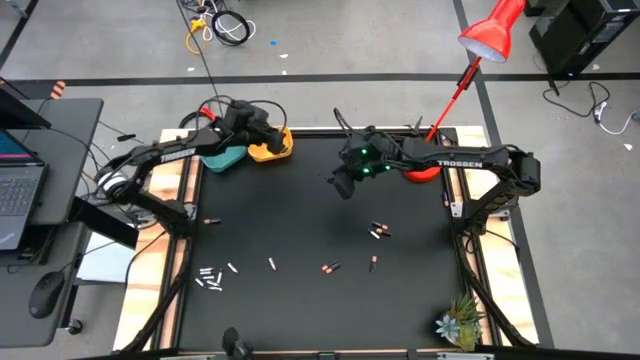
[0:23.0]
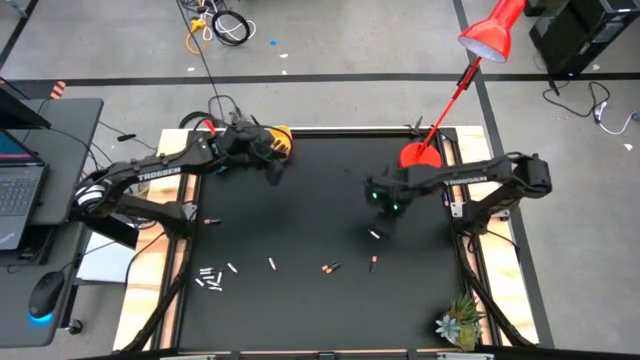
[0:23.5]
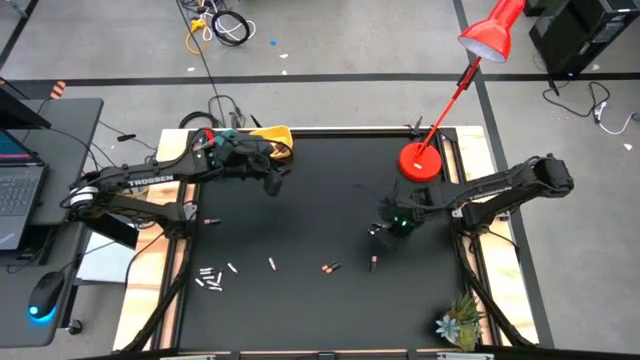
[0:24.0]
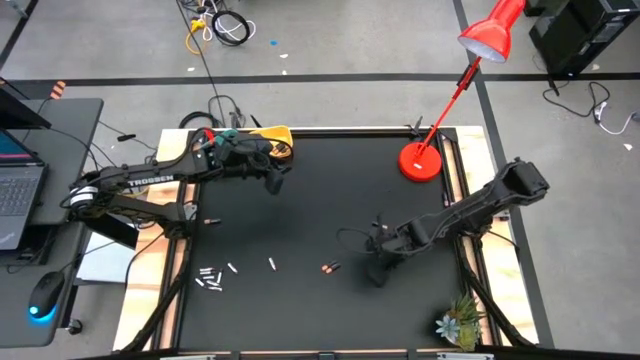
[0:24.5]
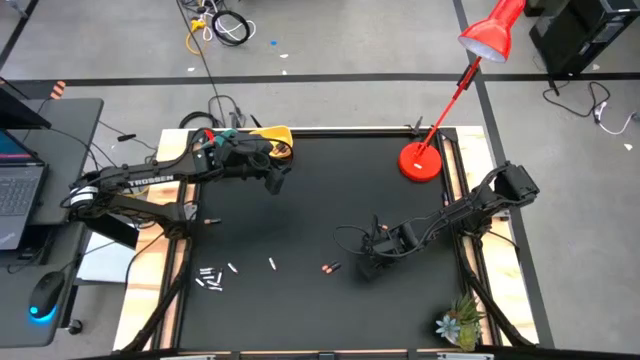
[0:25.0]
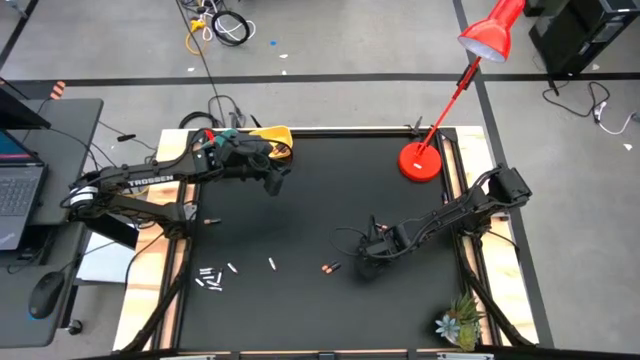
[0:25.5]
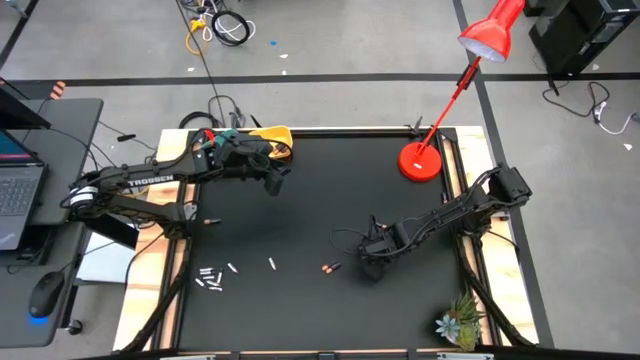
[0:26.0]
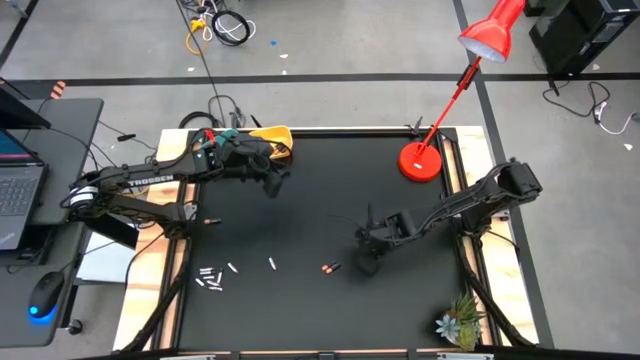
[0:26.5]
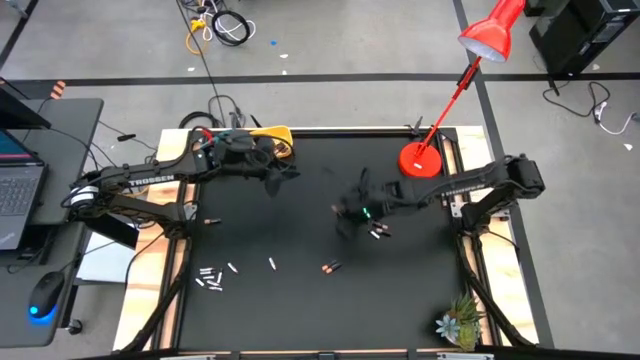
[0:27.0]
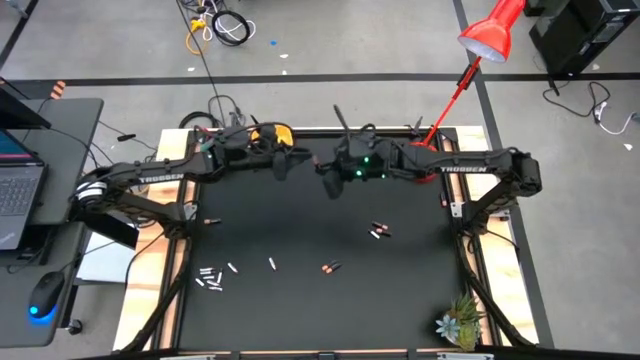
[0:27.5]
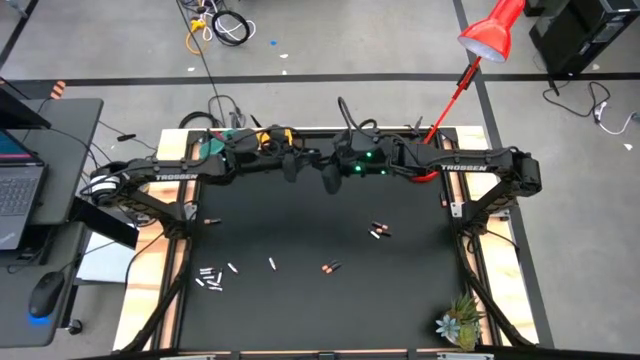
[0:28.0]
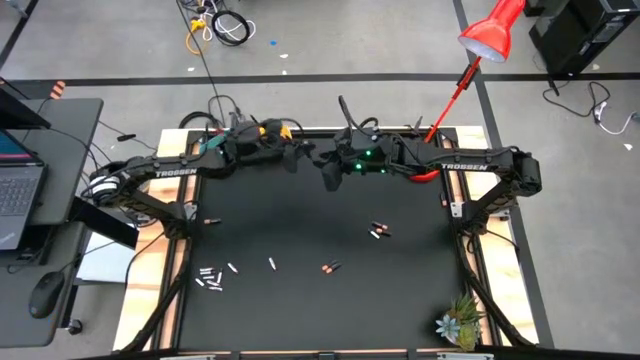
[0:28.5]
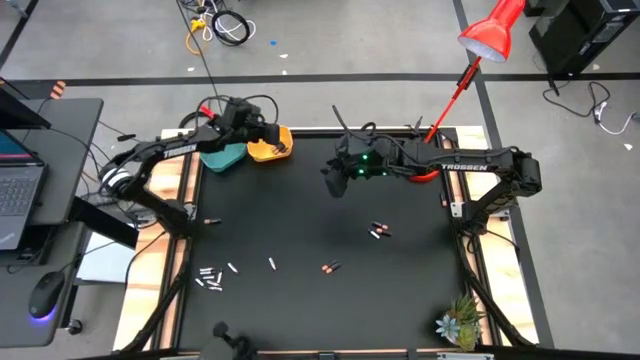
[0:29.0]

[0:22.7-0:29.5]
Task: Sort batteries
Put the black battery into the yellow bin

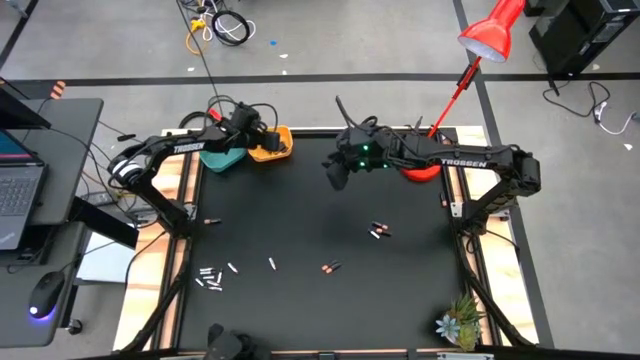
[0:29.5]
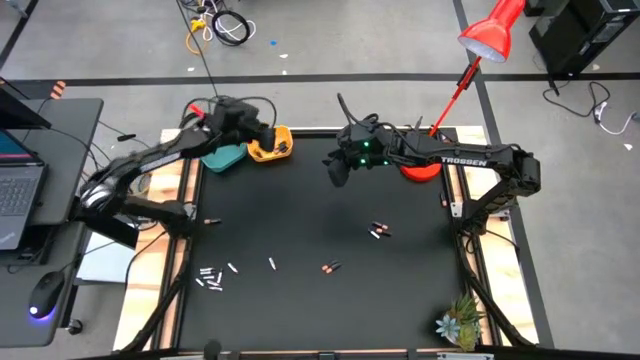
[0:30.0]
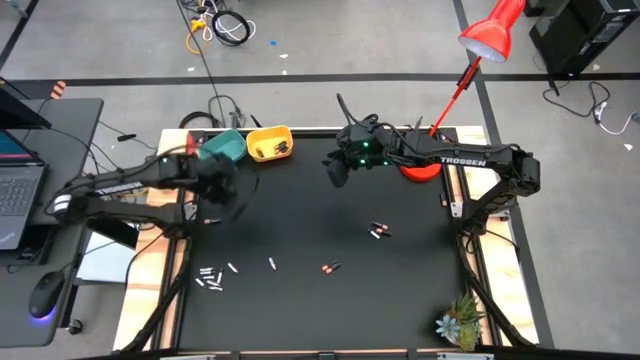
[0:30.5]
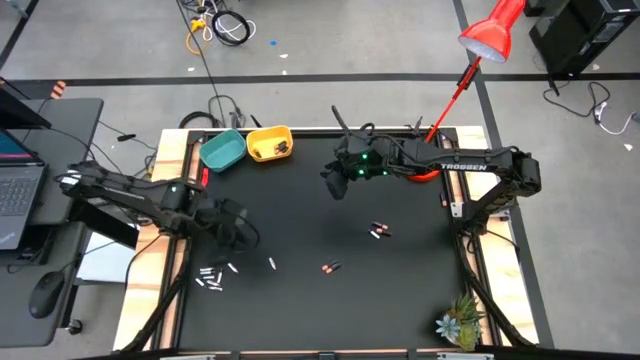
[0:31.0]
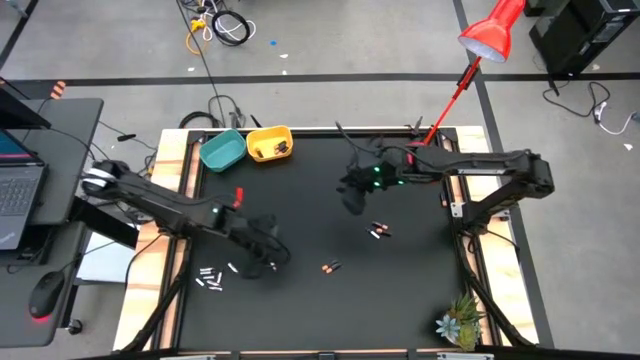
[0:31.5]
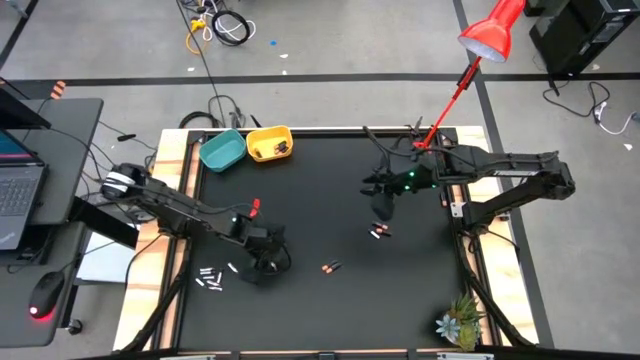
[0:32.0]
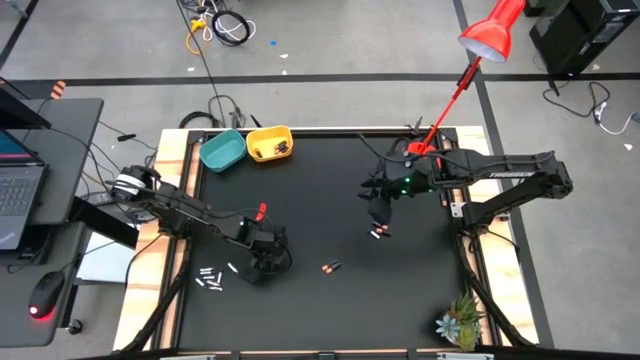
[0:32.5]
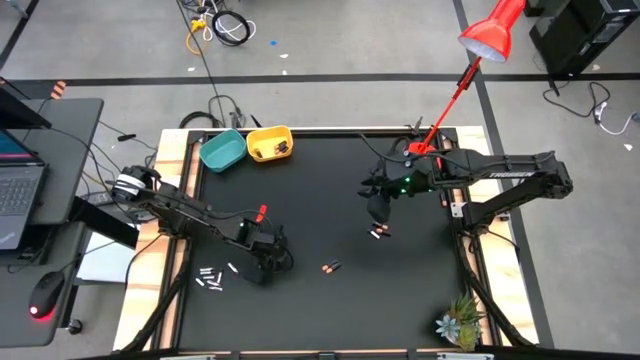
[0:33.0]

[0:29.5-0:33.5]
Put the silver battery into the blue bin

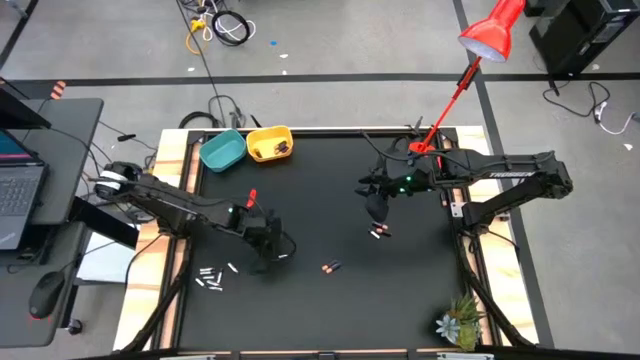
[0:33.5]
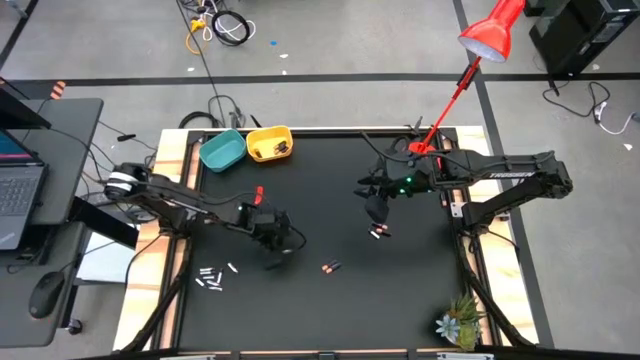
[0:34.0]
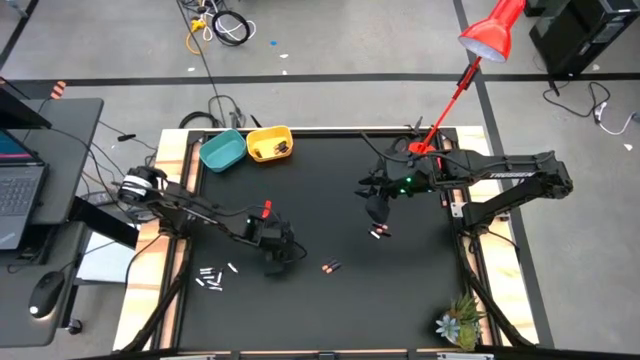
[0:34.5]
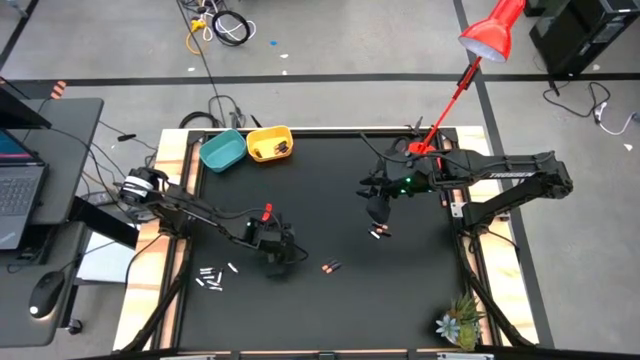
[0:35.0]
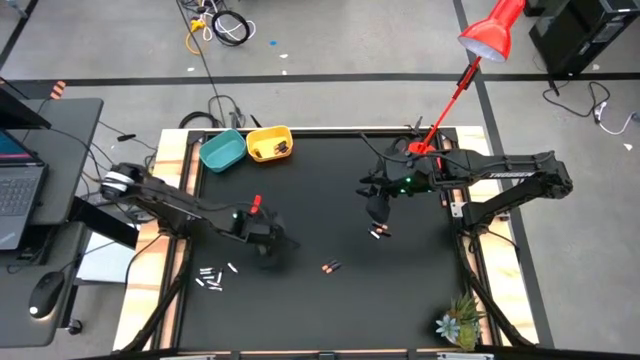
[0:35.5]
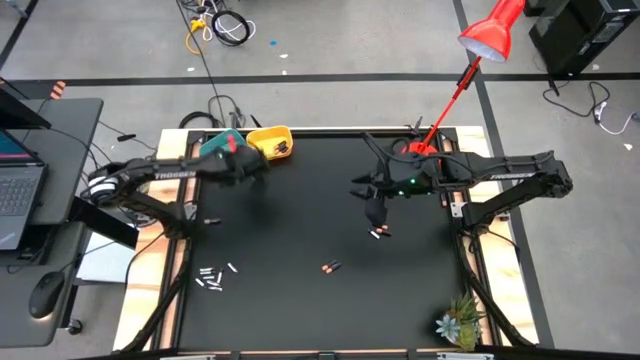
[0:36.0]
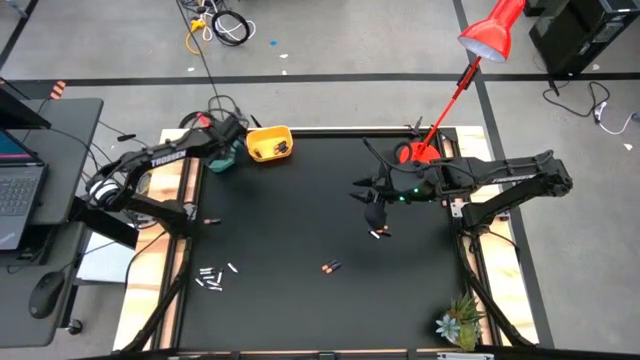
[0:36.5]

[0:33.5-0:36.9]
Put the silver battery into the blue bin

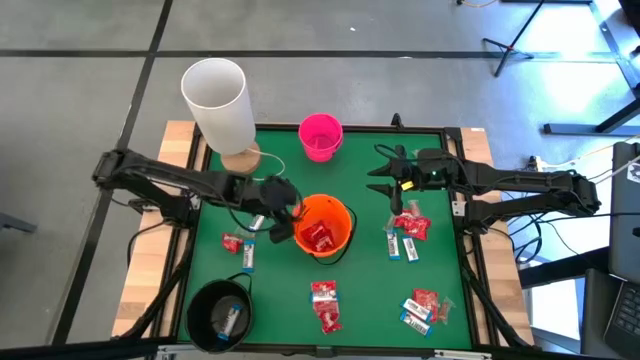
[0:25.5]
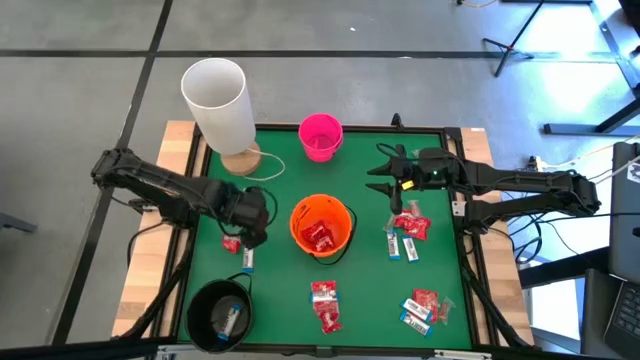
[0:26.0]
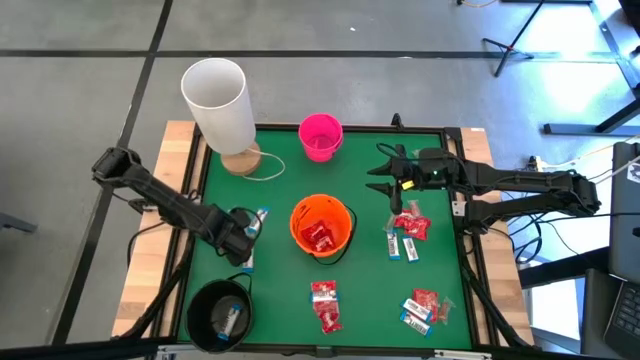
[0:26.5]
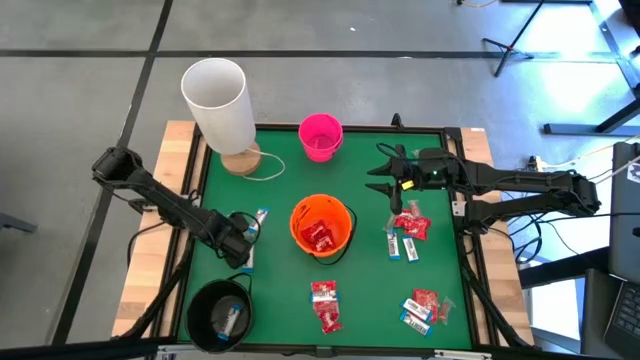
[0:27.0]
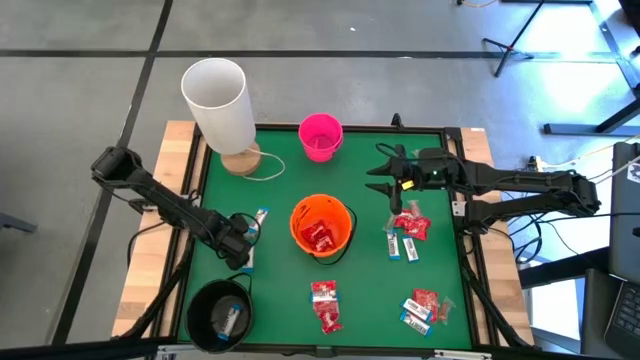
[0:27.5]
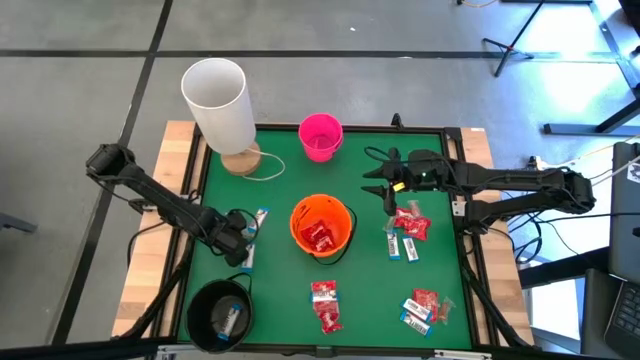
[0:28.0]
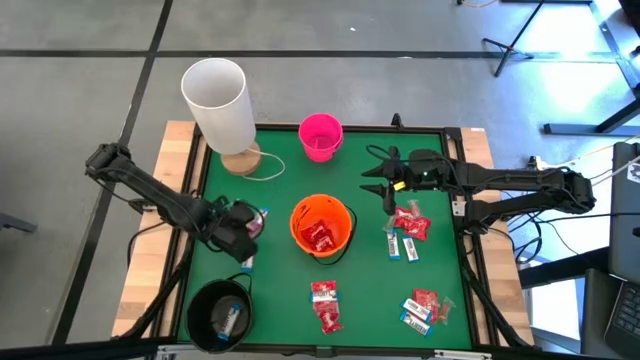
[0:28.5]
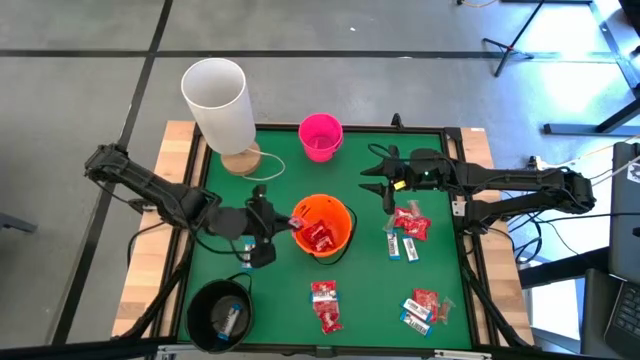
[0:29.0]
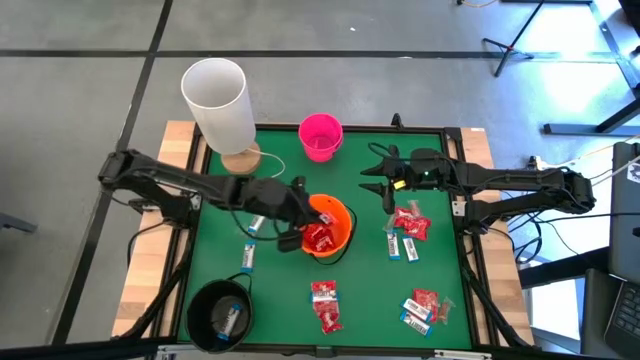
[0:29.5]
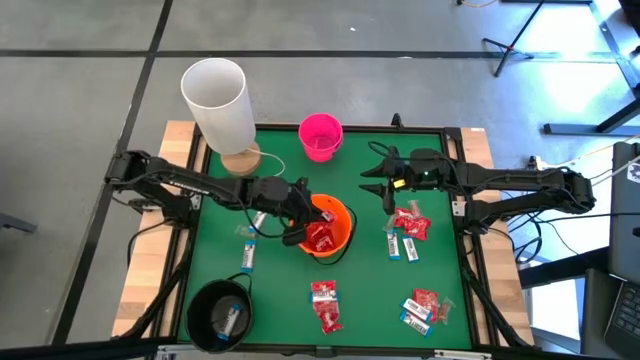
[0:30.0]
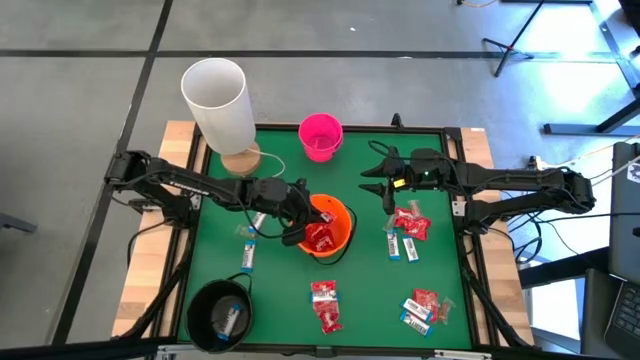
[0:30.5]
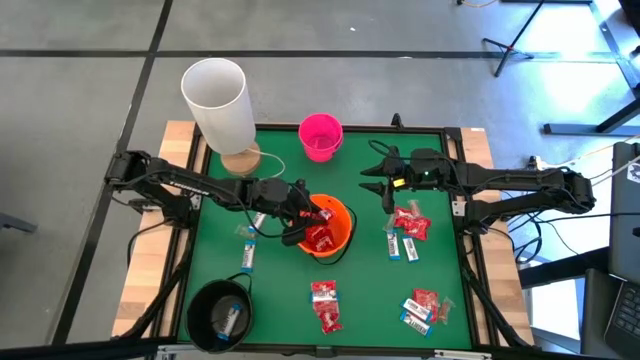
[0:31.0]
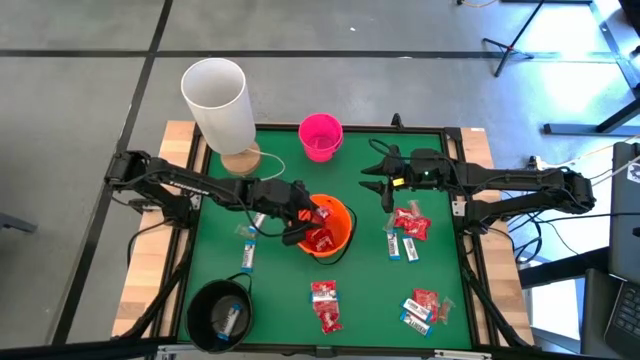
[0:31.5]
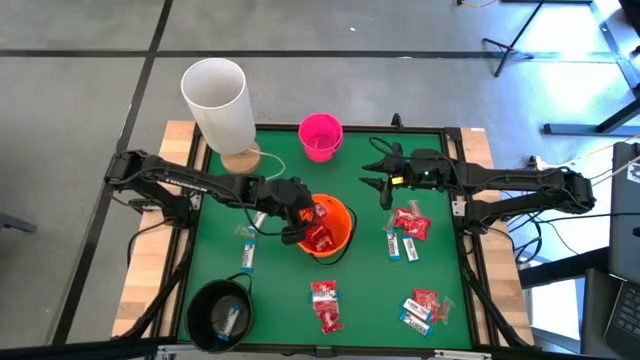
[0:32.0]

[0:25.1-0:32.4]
Task: Sort candy
Put the red candy into the orange bucket
